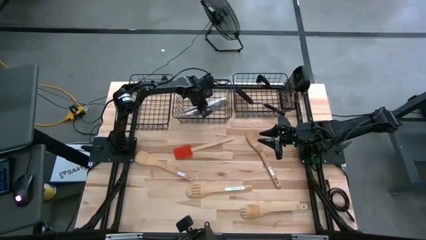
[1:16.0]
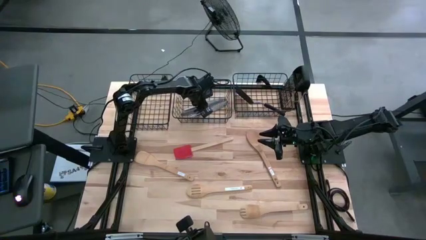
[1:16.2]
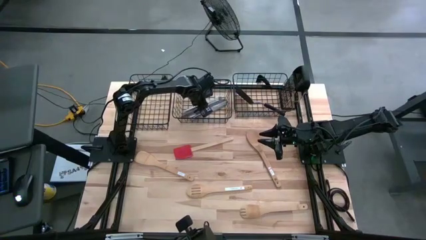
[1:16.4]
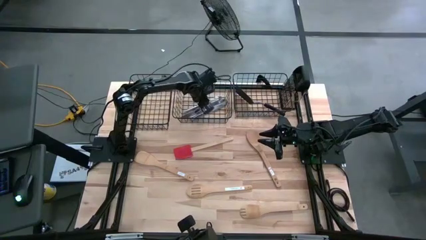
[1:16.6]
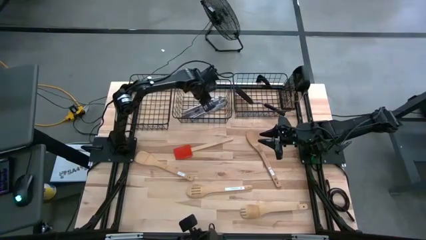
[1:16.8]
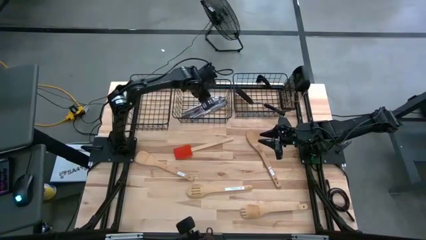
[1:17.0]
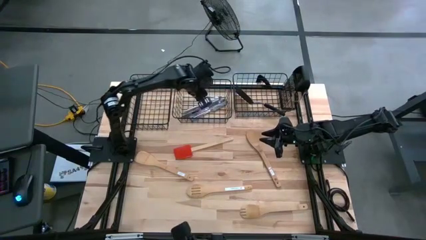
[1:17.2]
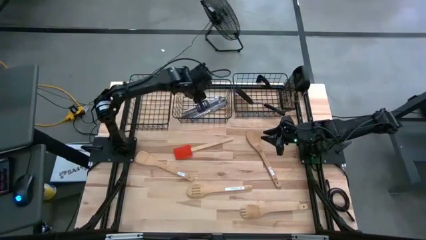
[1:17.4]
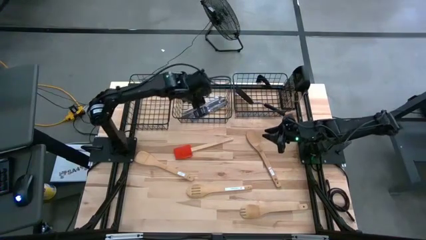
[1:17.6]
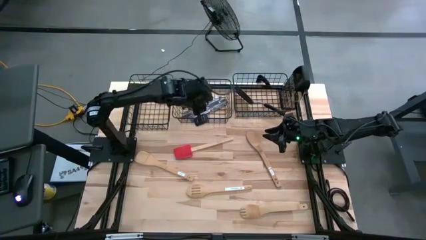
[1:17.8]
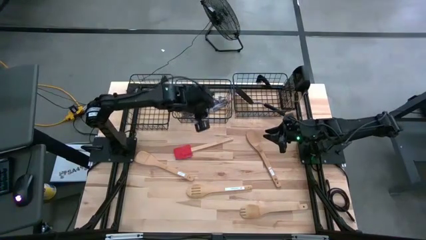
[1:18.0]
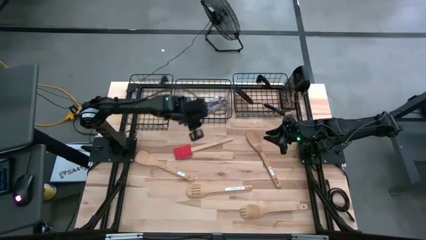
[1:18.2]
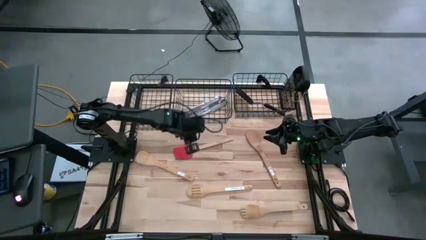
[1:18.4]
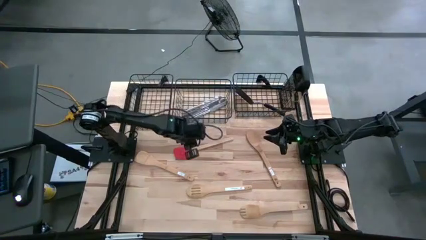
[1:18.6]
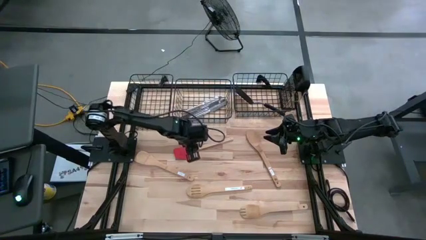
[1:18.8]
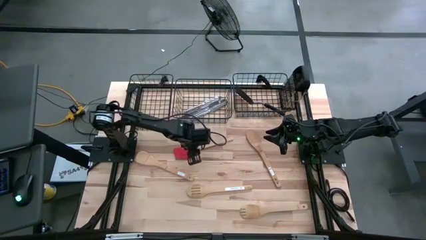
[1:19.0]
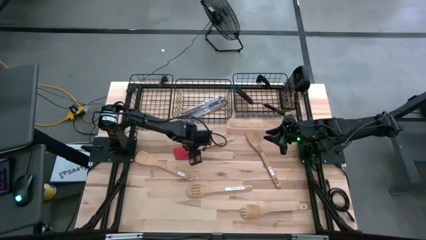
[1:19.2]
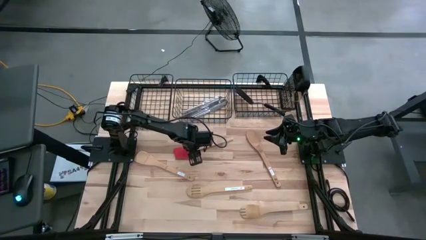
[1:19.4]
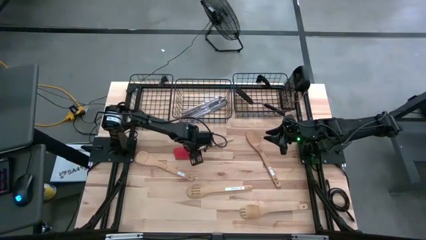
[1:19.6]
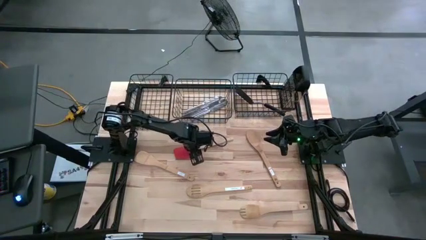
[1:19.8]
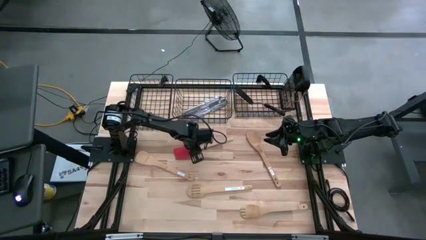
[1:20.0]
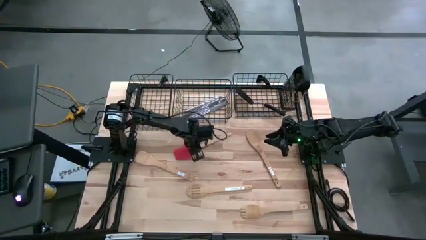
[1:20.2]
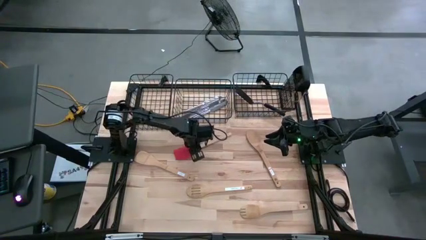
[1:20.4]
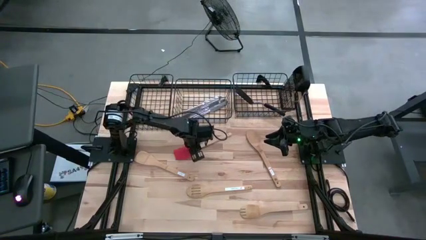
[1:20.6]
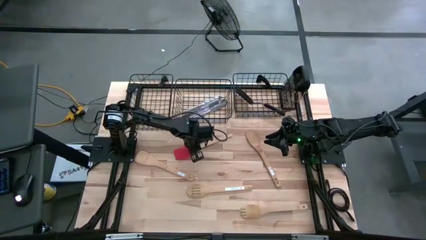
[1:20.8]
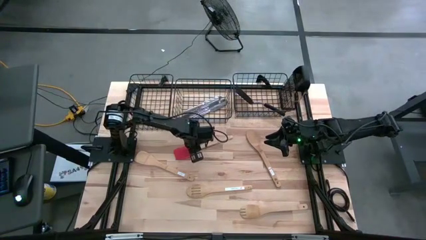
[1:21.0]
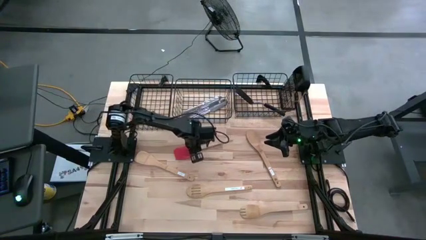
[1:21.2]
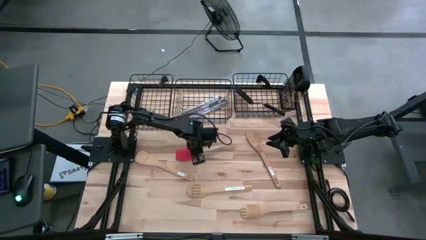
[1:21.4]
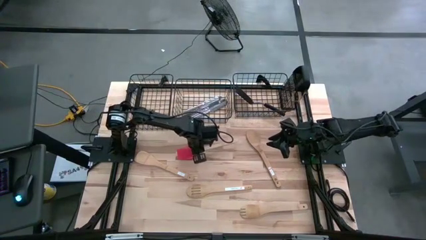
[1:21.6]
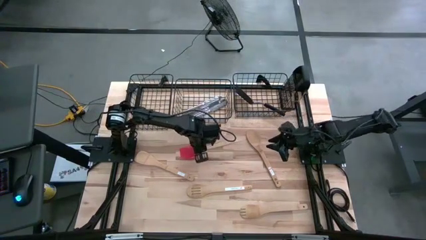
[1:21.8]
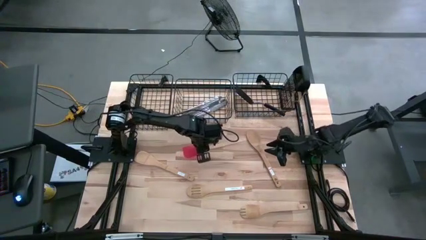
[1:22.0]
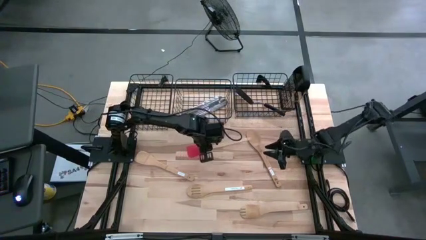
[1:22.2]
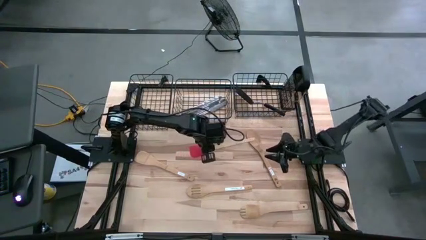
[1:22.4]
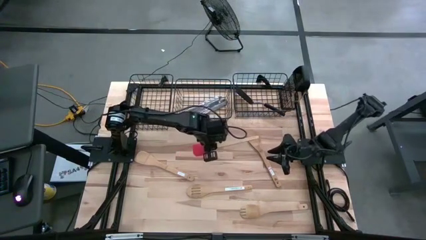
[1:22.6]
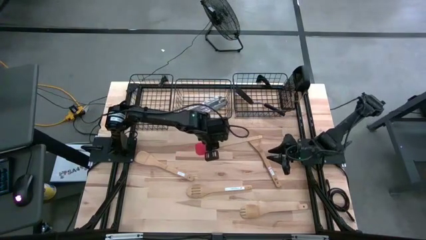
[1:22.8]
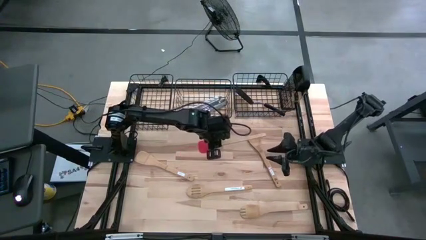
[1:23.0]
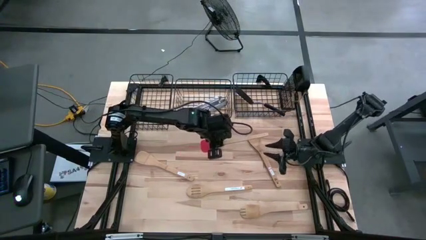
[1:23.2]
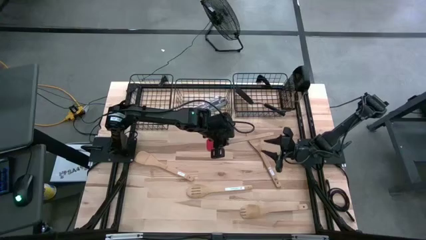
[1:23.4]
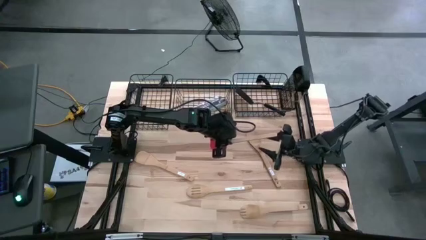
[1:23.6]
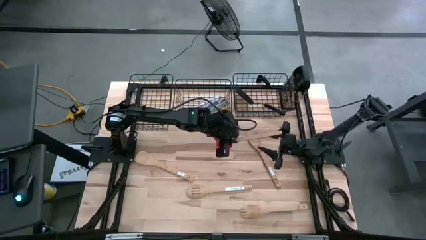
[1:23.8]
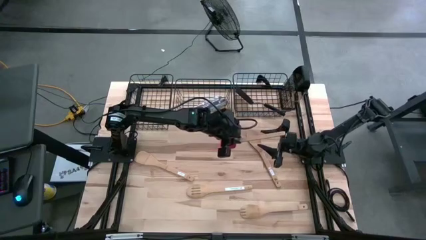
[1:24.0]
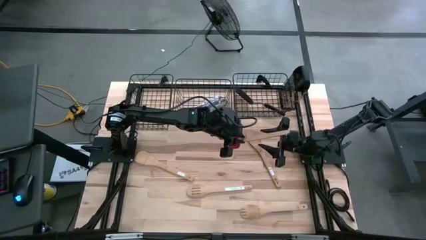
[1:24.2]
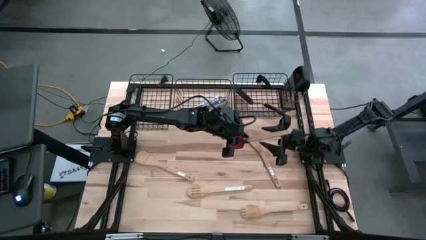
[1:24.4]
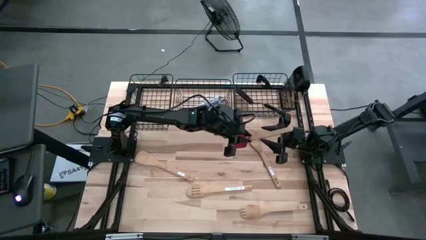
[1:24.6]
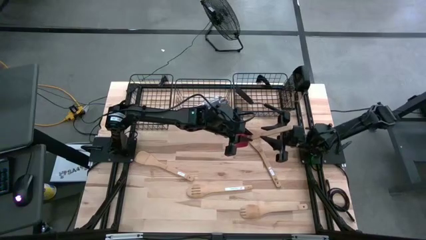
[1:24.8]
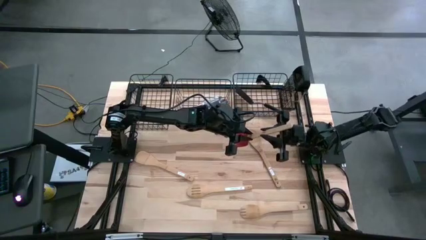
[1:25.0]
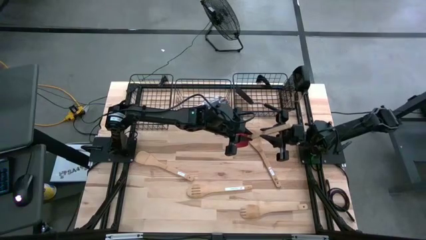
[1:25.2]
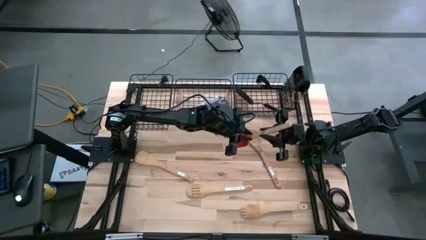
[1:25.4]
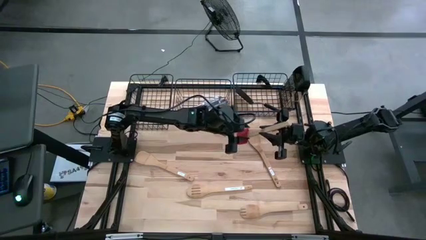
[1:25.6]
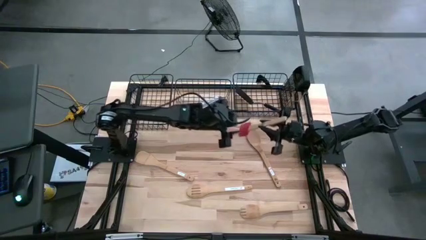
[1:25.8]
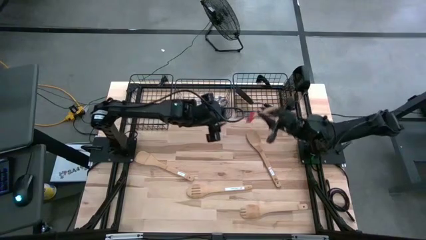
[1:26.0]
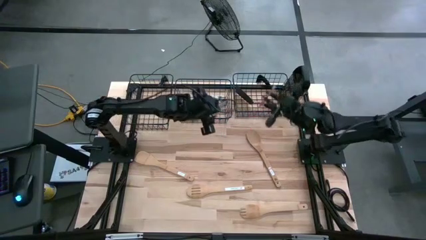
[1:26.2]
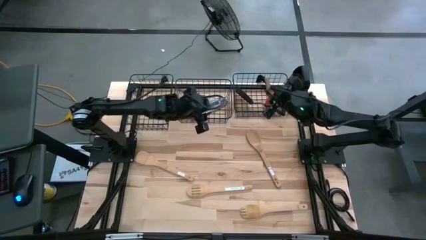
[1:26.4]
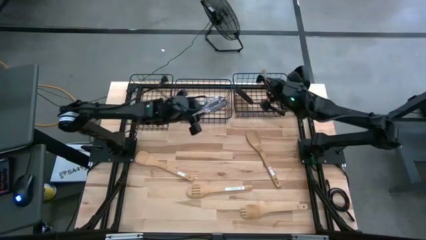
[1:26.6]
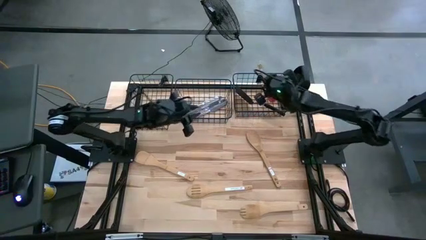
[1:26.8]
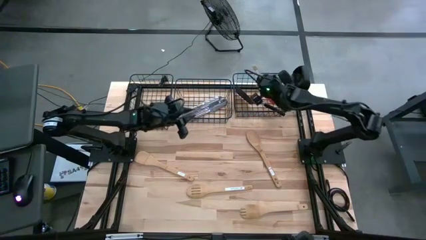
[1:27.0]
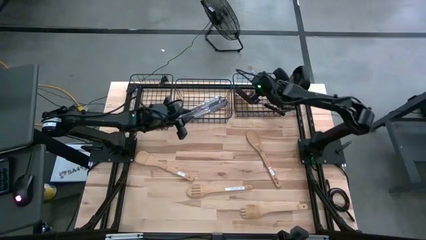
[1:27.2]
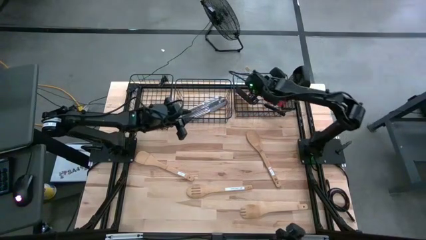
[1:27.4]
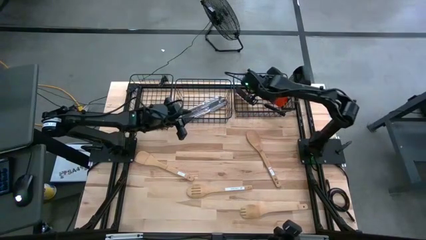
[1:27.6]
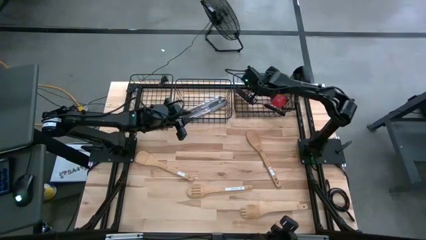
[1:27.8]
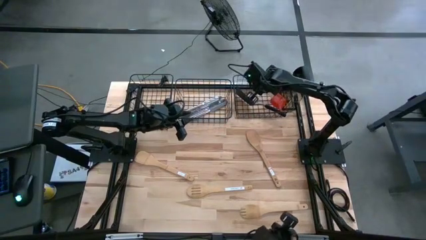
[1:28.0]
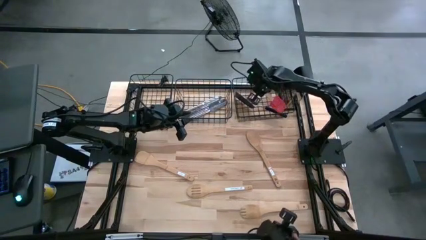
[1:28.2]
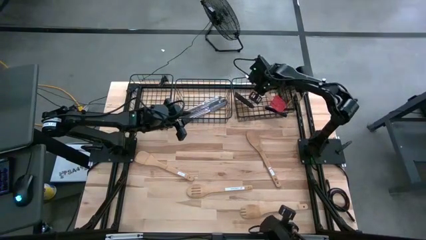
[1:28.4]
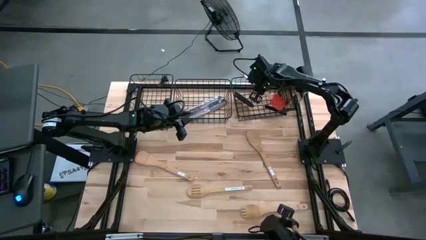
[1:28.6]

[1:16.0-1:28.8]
Task: Pick & Place Kitchen Items
Put the red silicone spatula into the right wire basket

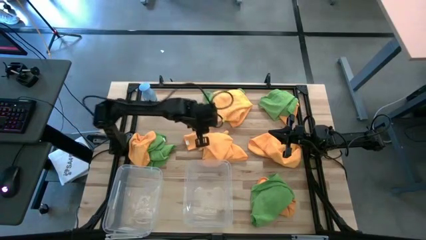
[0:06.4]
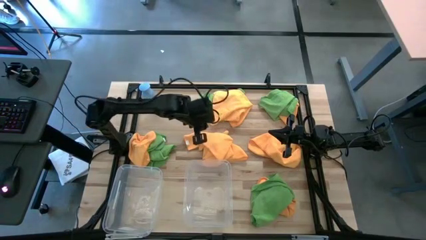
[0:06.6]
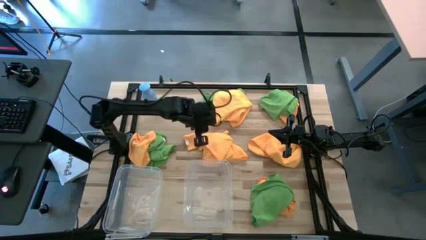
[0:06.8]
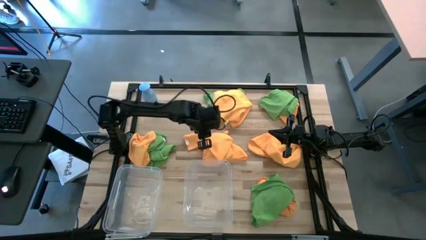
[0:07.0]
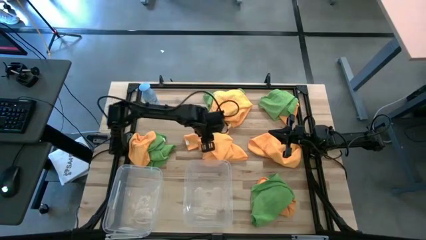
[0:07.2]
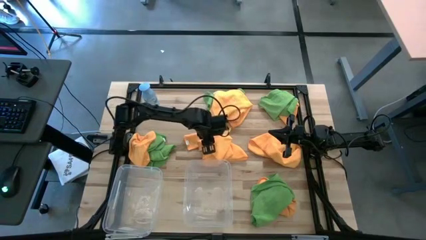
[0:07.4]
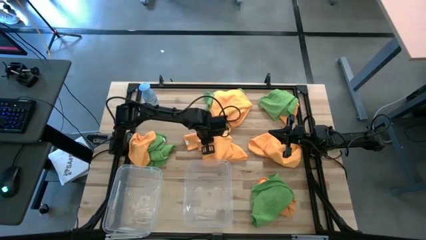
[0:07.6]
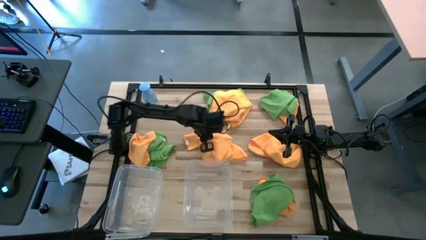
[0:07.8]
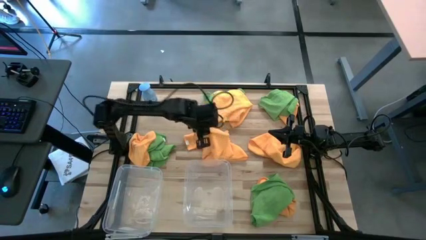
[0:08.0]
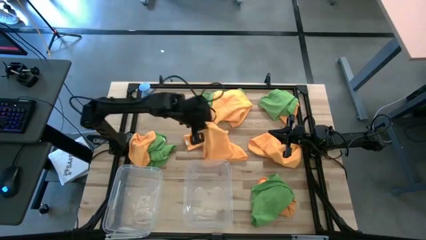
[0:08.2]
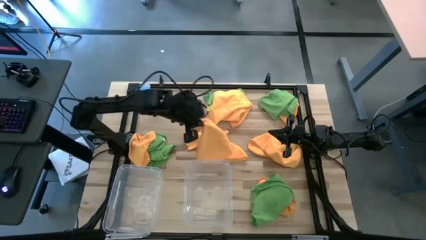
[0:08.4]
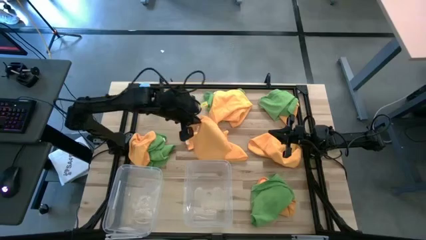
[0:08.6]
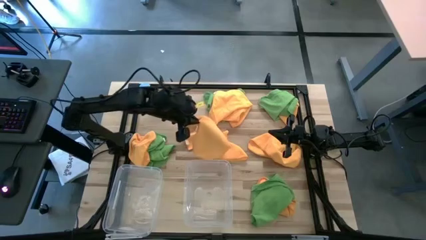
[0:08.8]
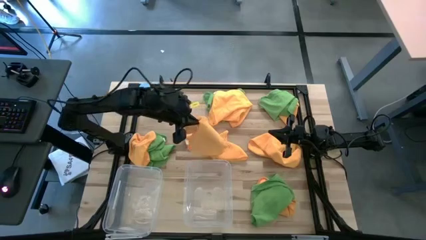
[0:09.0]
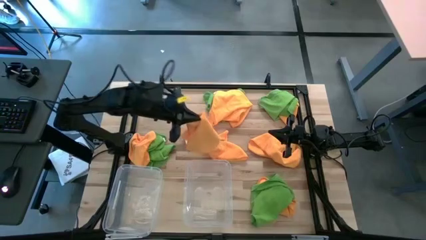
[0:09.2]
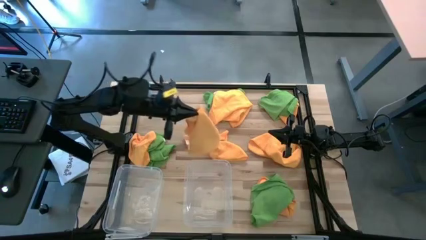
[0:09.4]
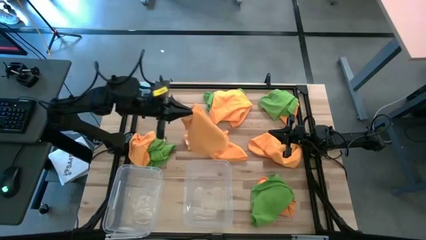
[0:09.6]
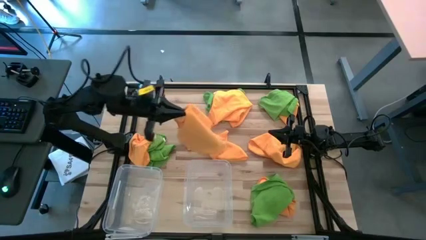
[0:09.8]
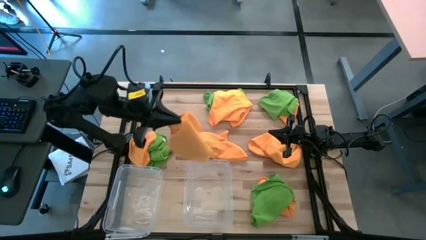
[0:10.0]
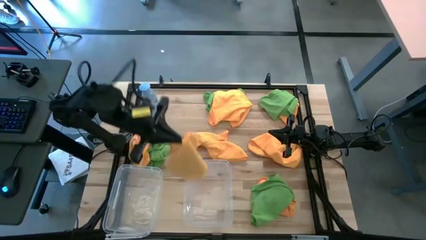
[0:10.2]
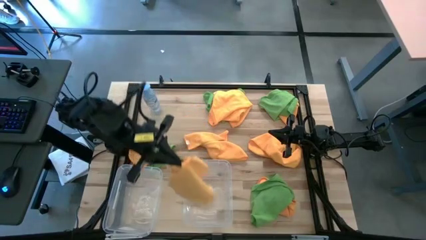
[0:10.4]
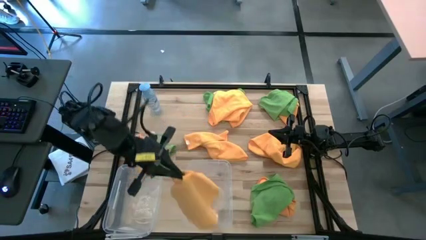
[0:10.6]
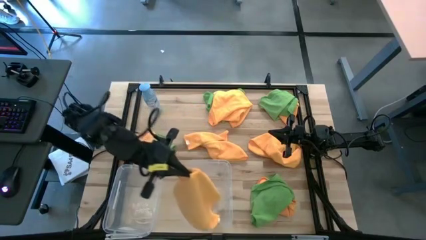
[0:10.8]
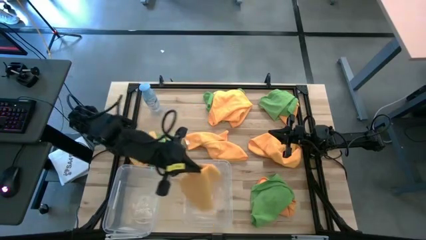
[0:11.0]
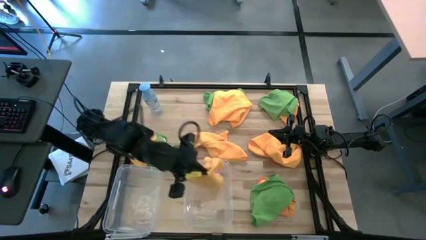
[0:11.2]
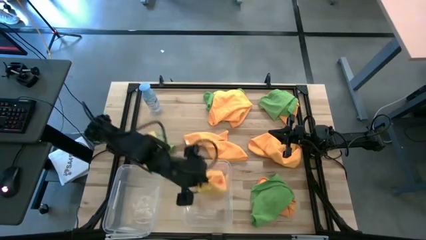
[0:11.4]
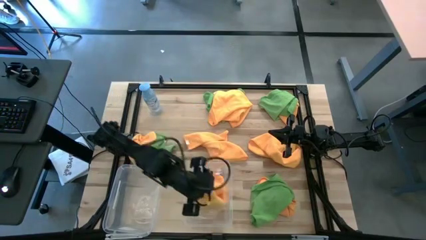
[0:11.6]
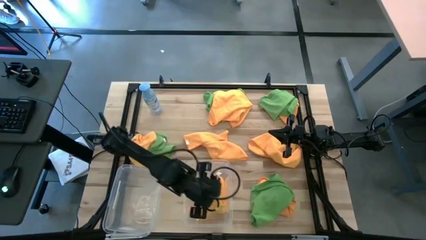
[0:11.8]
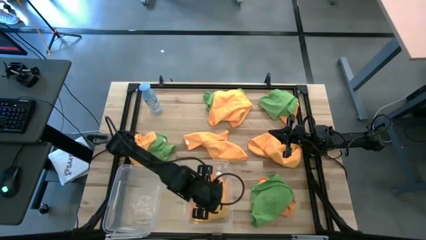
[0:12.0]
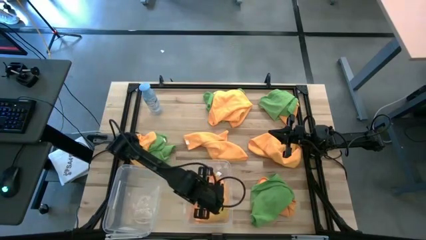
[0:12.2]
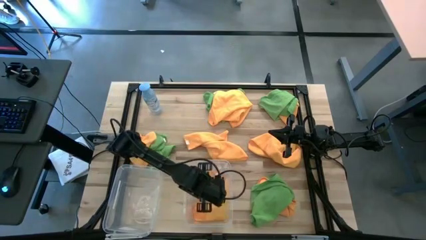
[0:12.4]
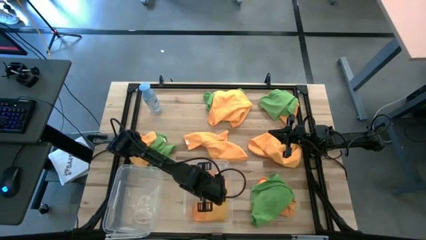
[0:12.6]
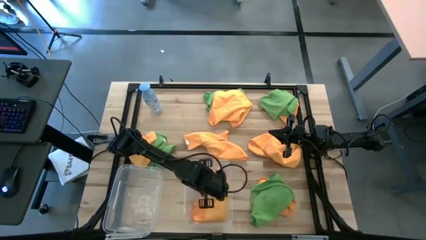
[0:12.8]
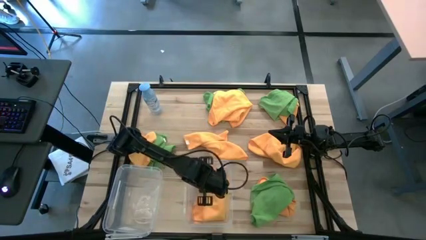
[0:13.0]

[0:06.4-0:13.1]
Task: Sort microfiber towel by color & place in baskets
Put the orange towel into the right transparent bin
